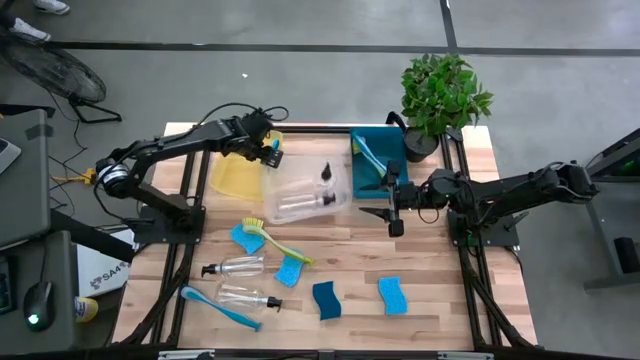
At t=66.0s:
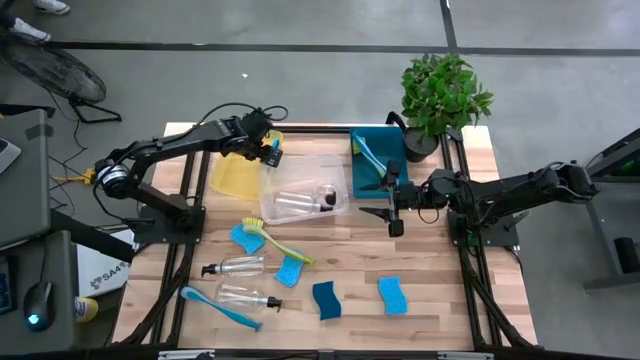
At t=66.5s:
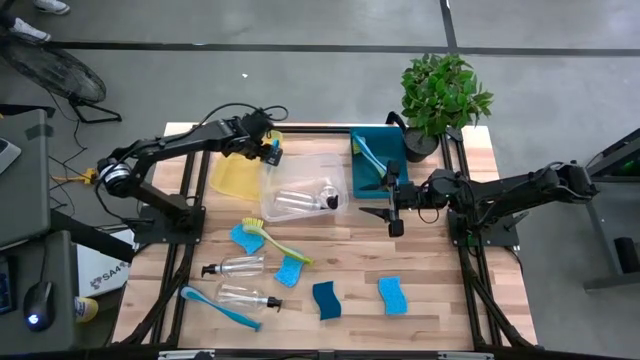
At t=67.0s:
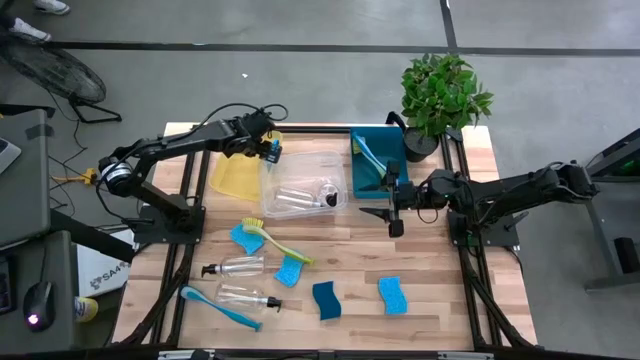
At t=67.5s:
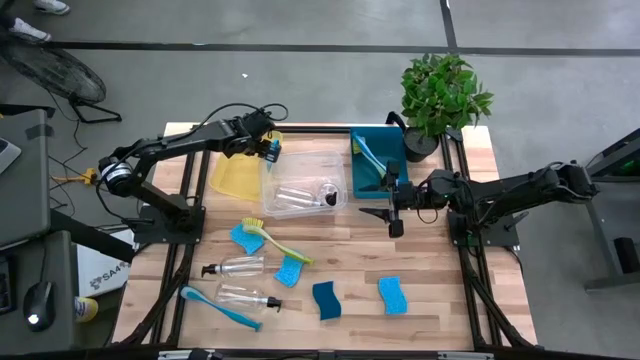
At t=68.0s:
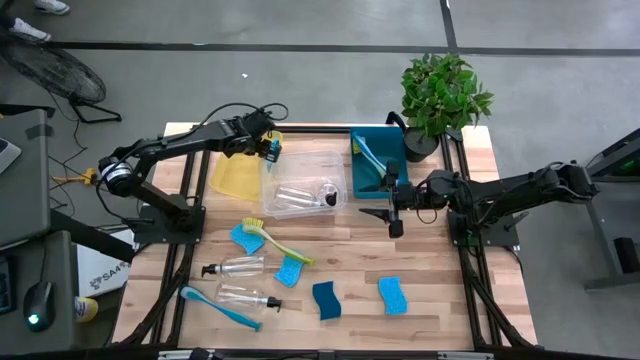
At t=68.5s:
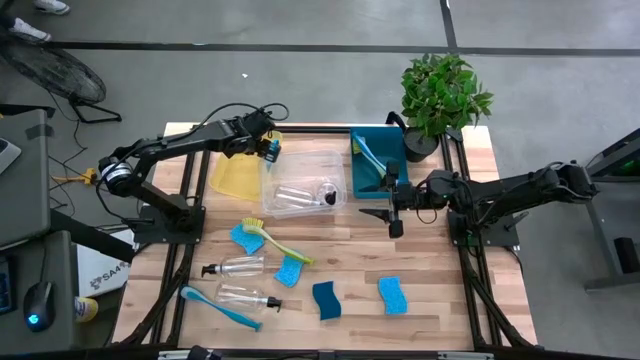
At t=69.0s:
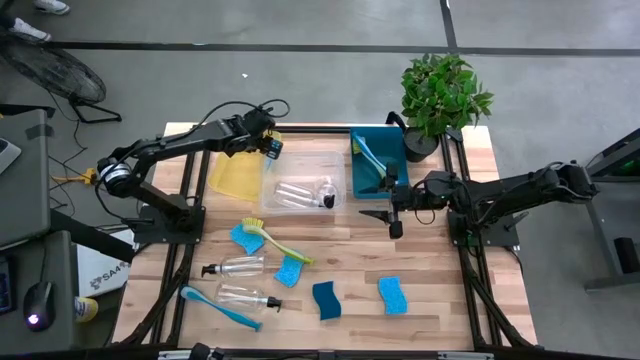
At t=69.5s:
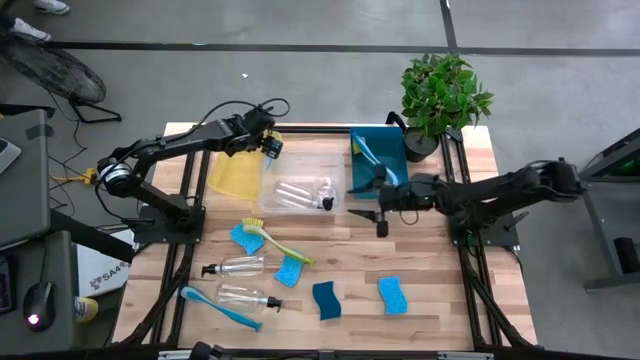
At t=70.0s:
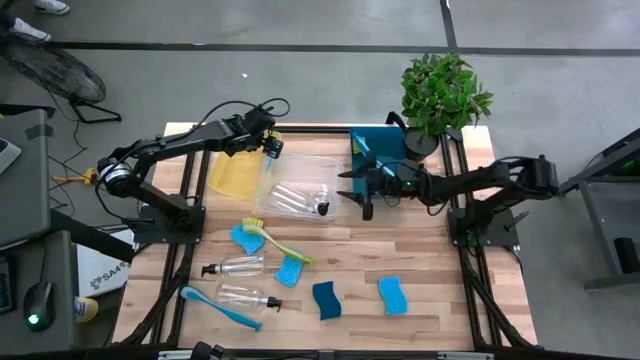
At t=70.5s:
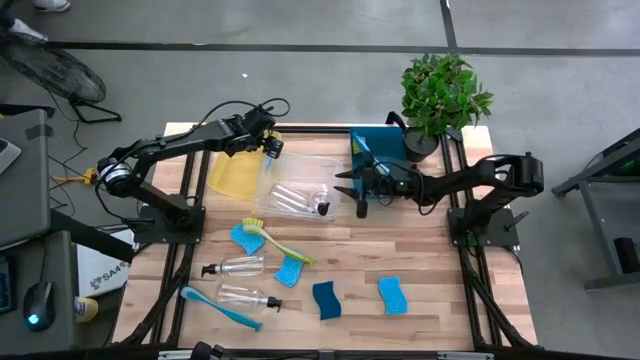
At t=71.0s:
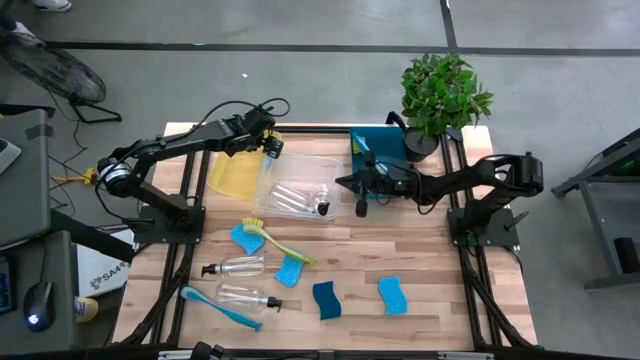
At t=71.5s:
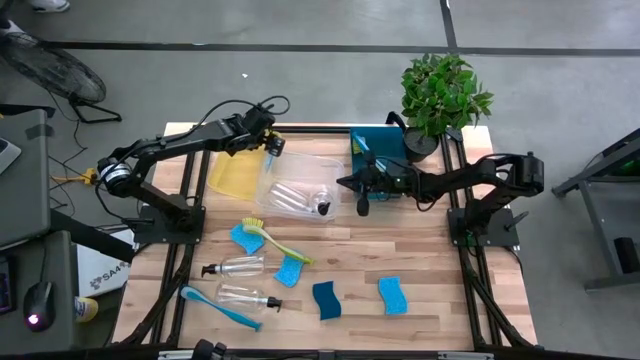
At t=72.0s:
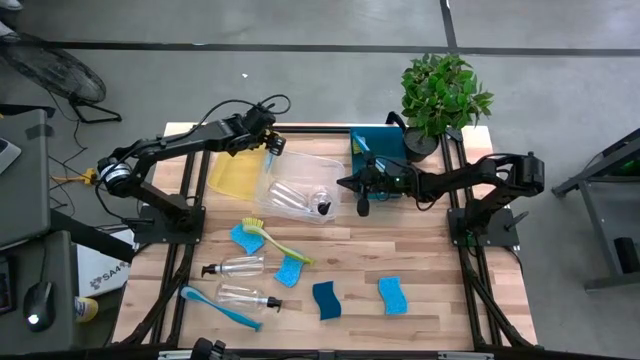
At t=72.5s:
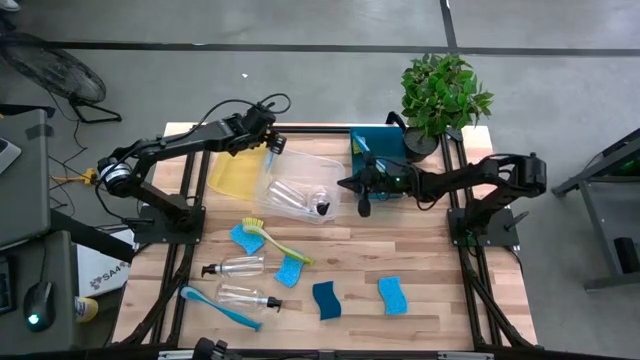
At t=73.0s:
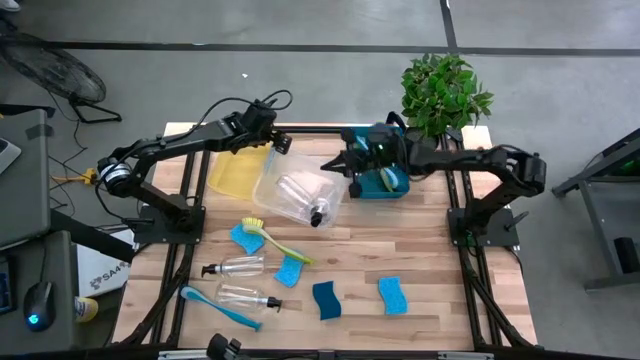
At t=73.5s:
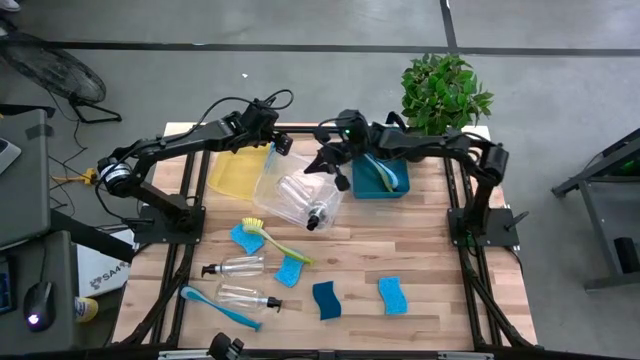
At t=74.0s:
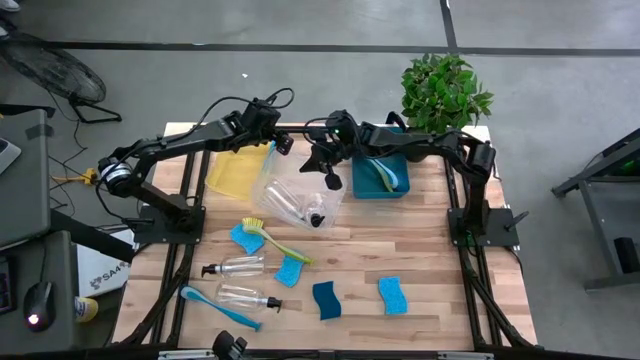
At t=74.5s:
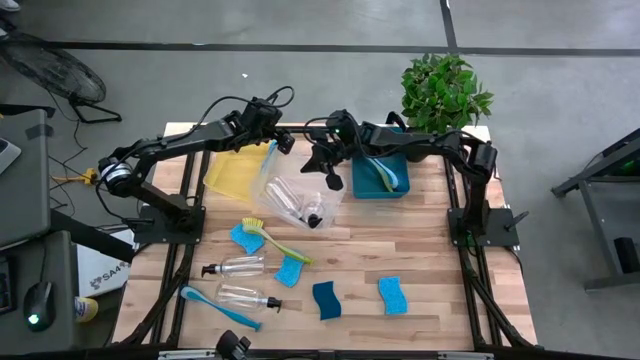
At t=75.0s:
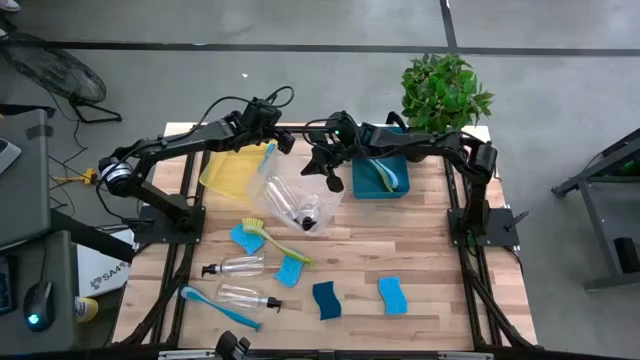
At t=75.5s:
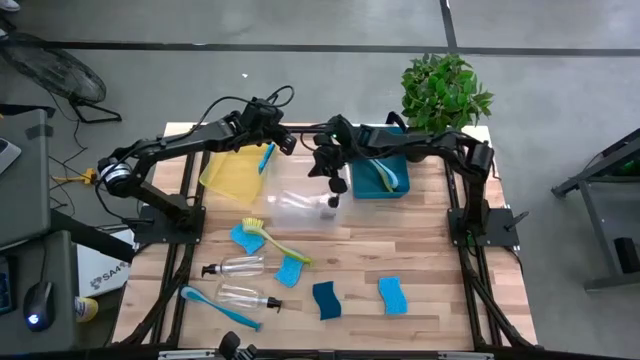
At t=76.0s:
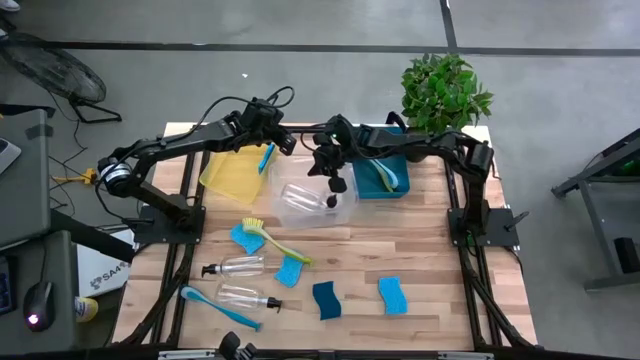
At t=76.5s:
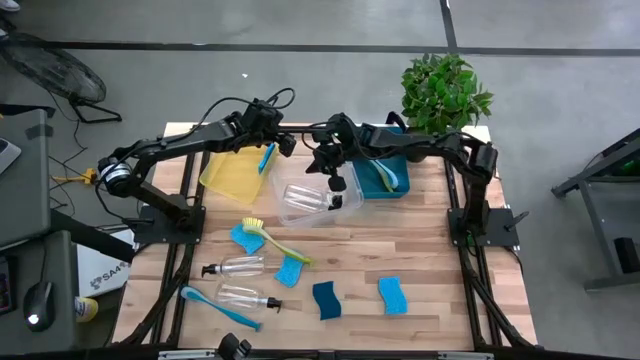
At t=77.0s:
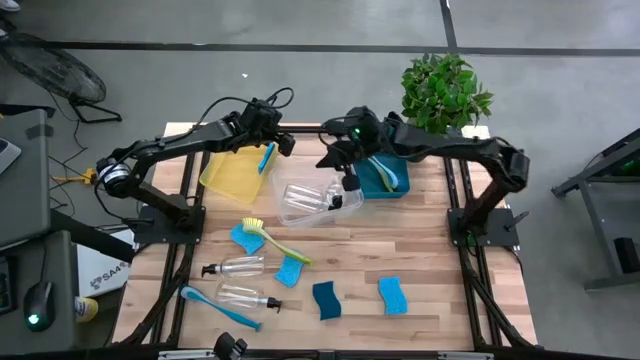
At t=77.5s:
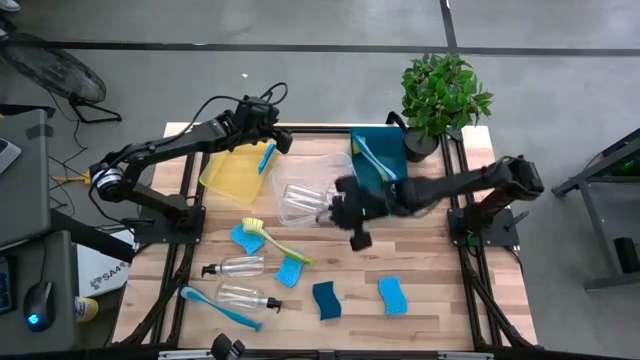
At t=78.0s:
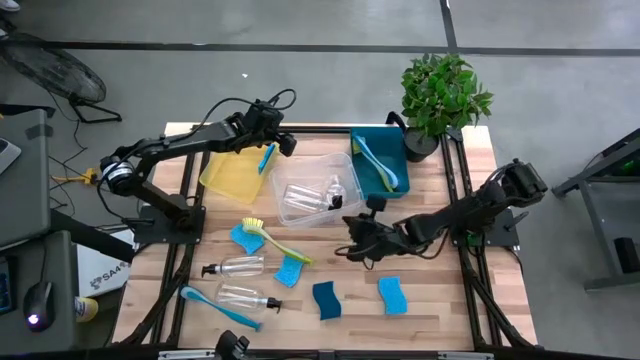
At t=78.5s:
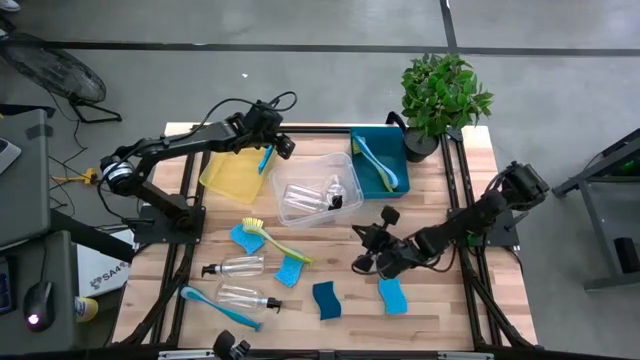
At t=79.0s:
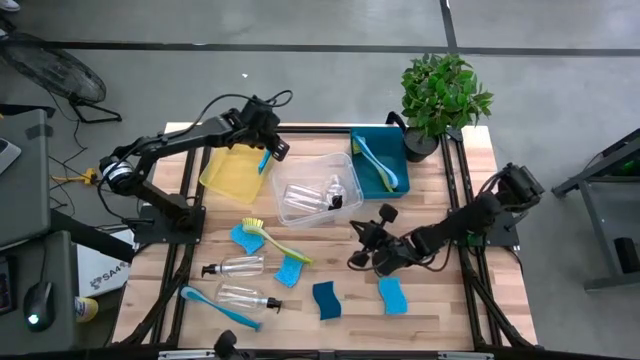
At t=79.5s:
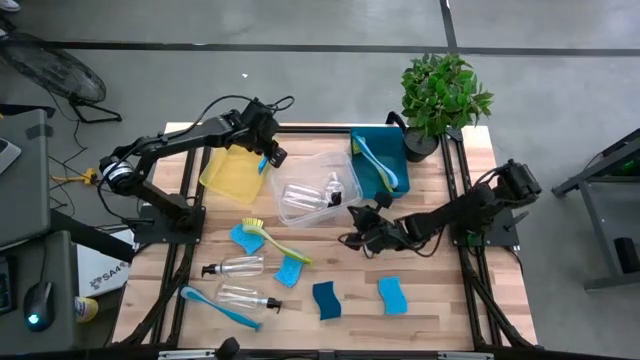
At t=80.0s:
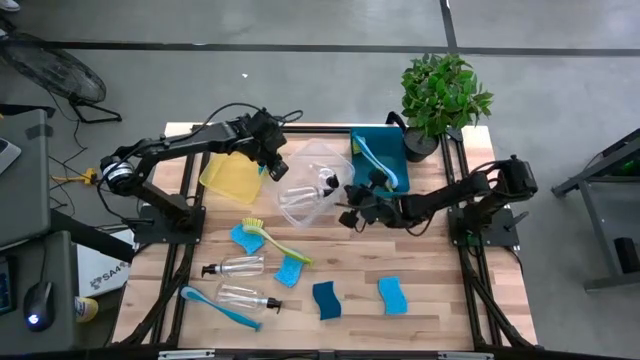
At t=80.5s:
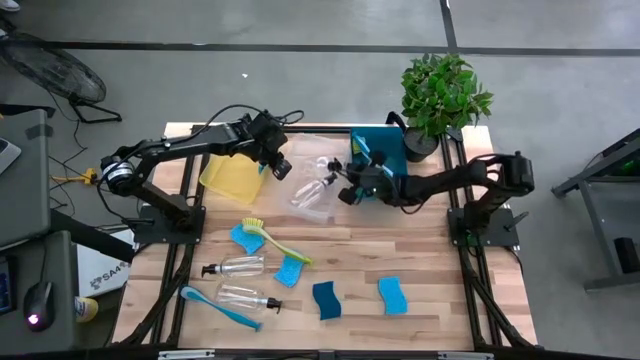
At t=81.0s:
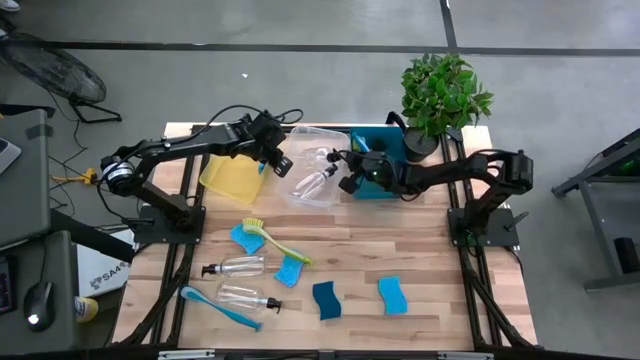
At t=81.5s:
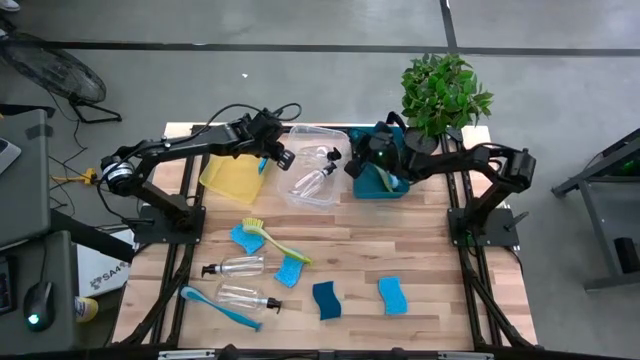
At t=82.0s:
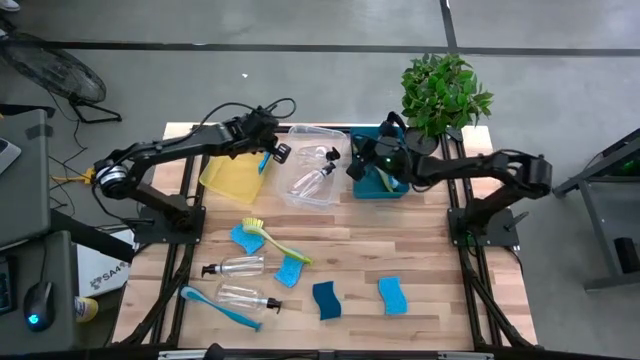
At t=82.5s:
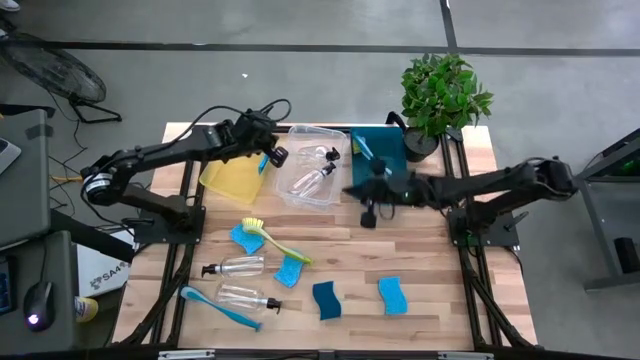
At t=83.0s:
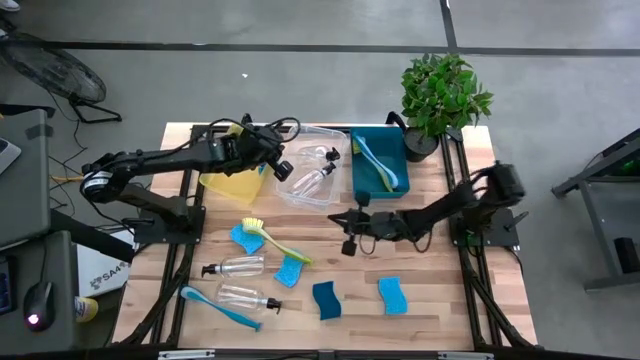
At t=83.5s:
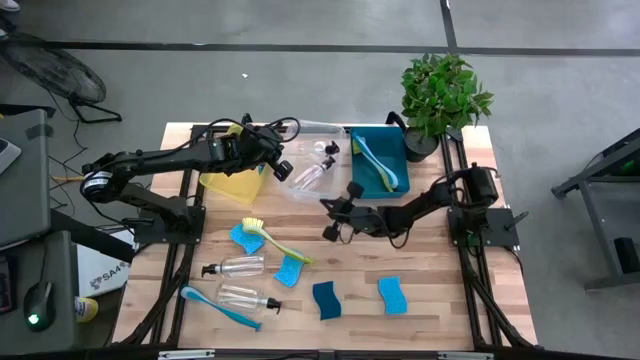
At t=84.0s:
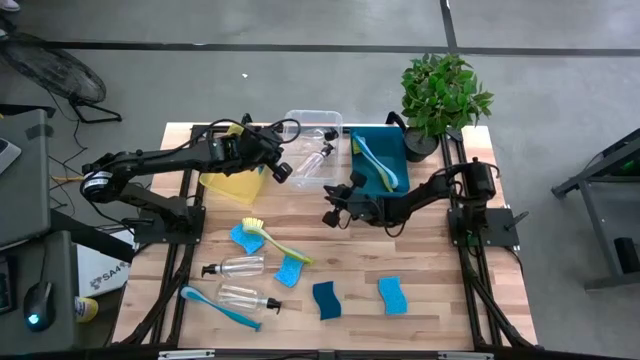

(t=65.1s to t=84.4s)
Task: Pick & Place Kitchen Sink Supplies
Adjust the transparent bin
